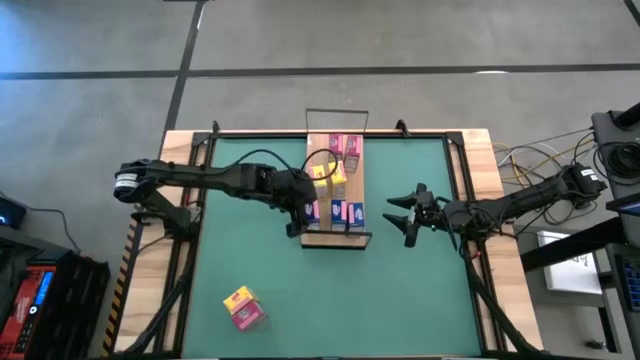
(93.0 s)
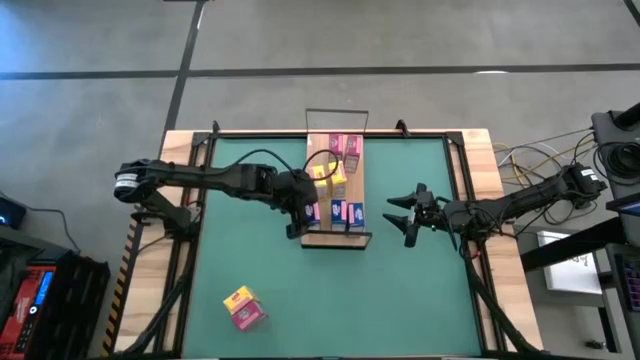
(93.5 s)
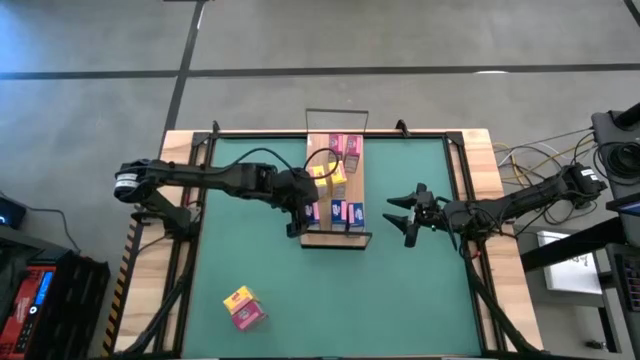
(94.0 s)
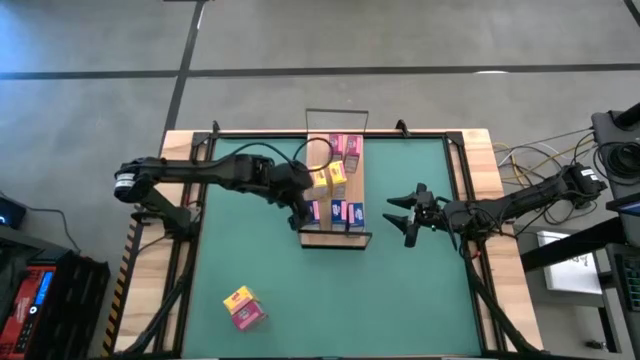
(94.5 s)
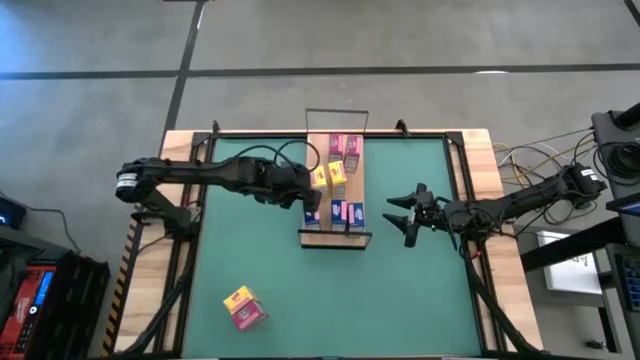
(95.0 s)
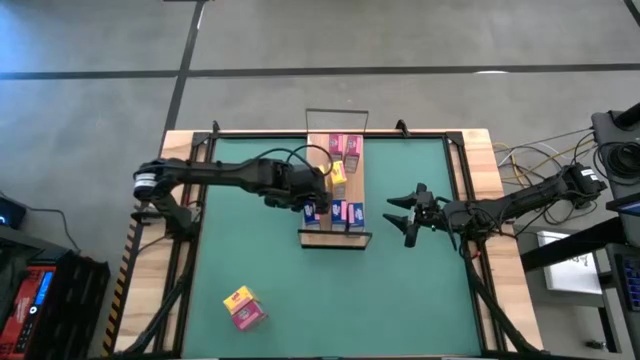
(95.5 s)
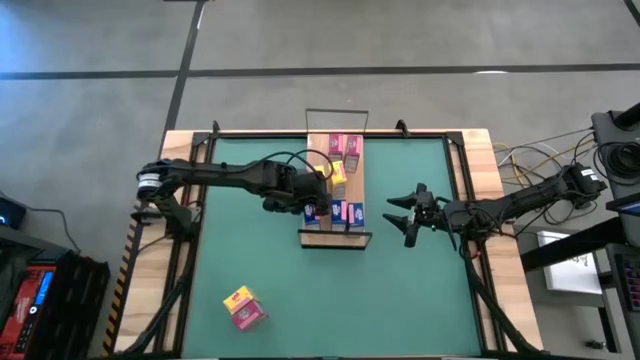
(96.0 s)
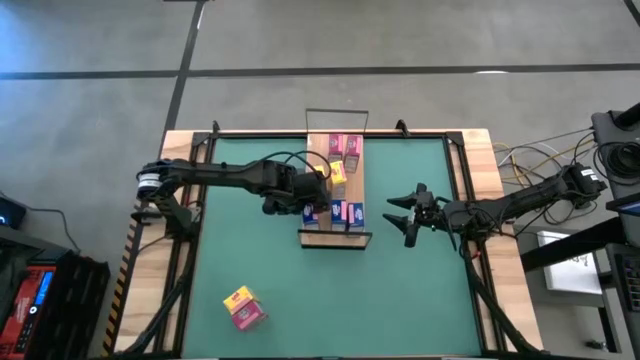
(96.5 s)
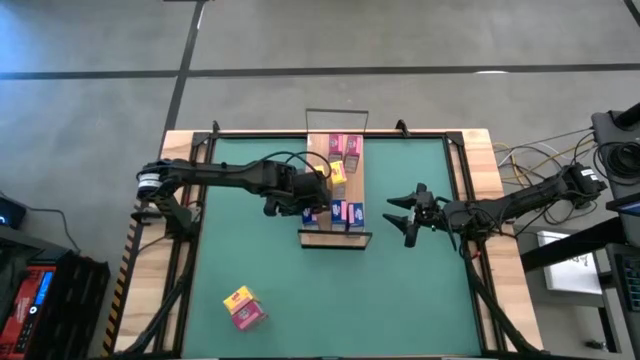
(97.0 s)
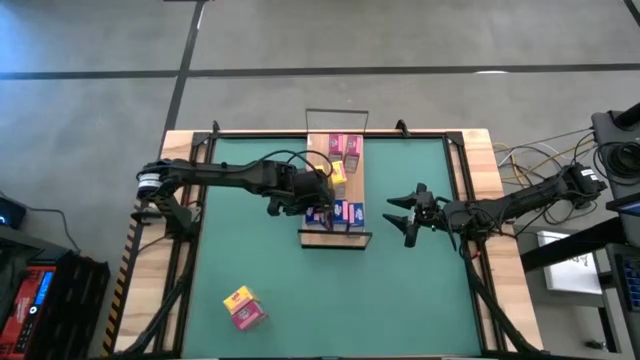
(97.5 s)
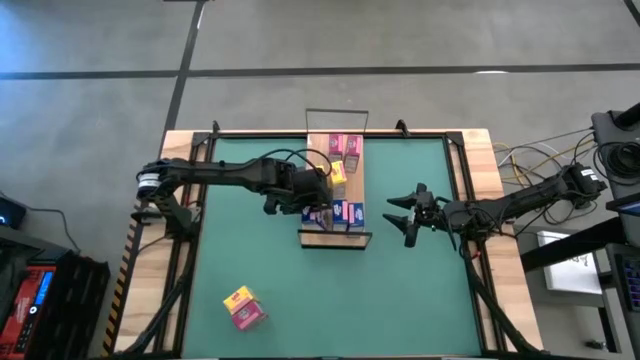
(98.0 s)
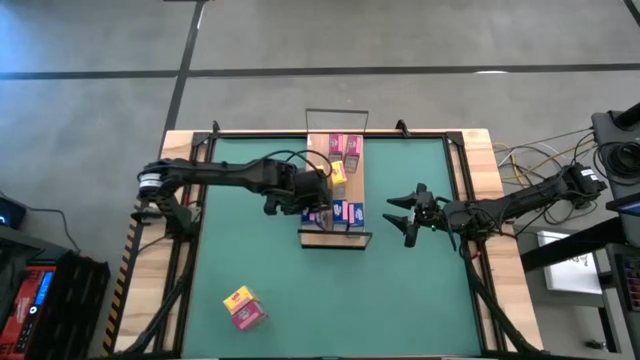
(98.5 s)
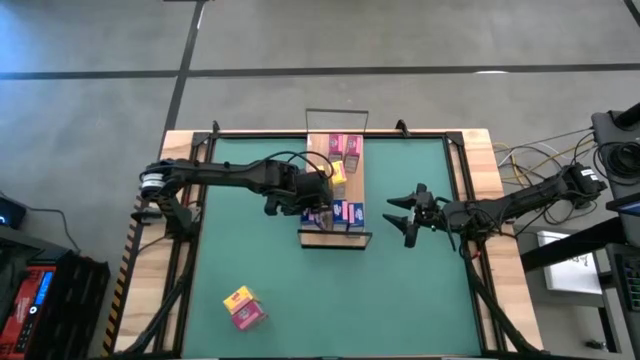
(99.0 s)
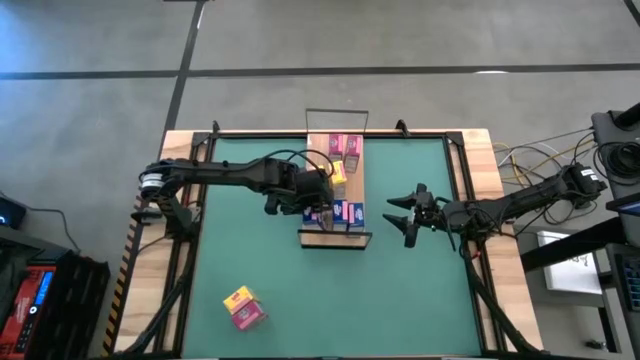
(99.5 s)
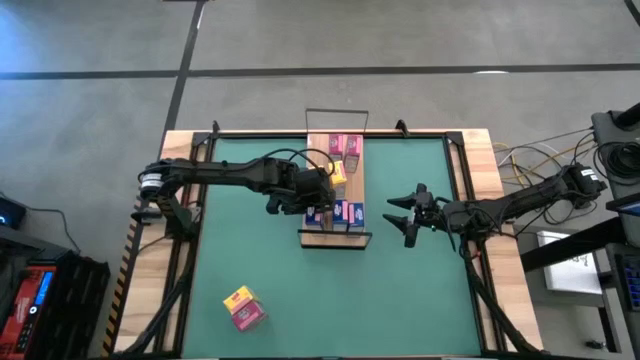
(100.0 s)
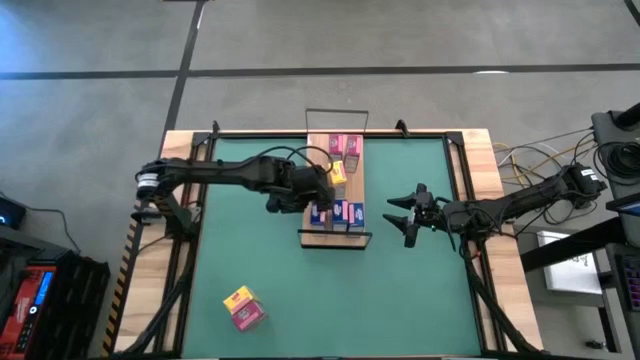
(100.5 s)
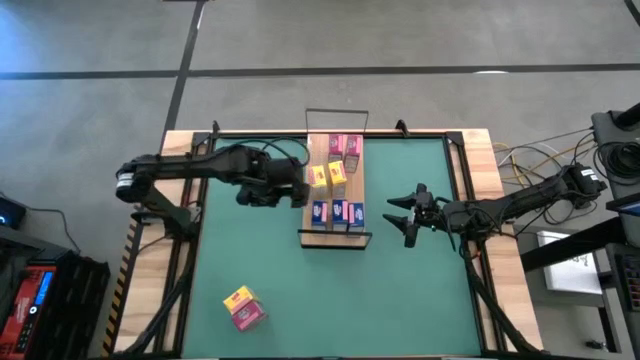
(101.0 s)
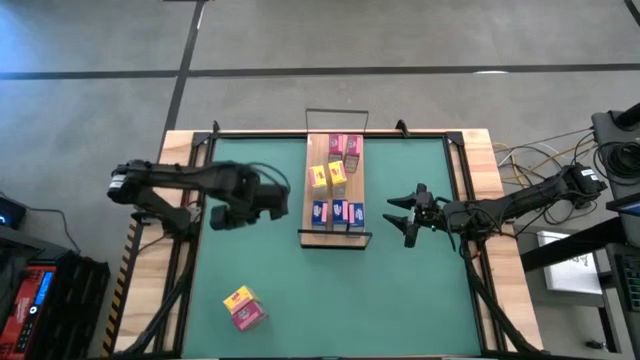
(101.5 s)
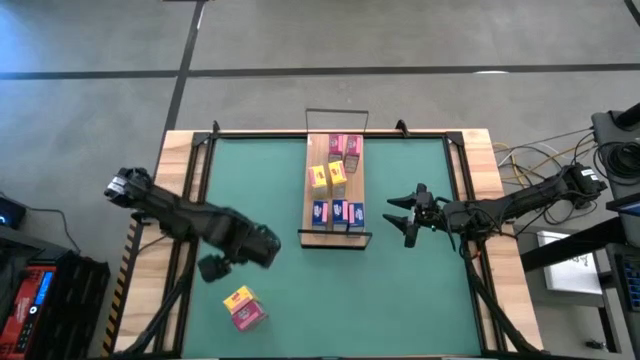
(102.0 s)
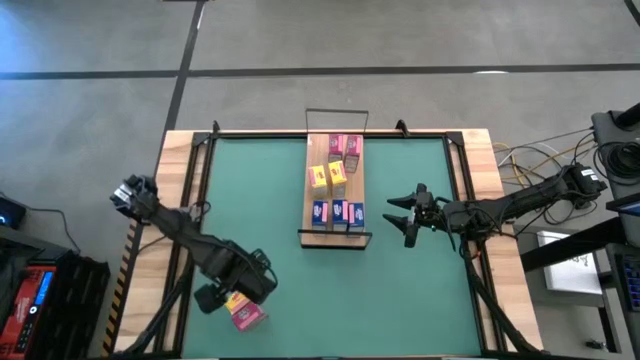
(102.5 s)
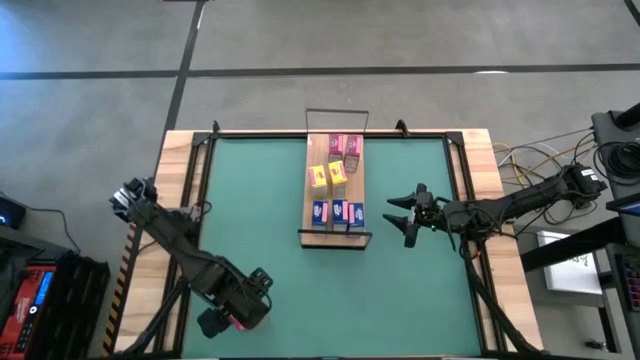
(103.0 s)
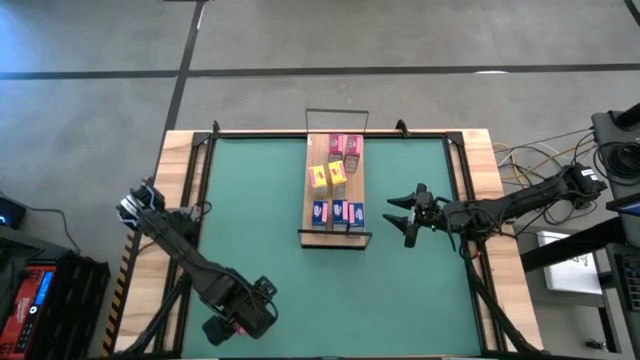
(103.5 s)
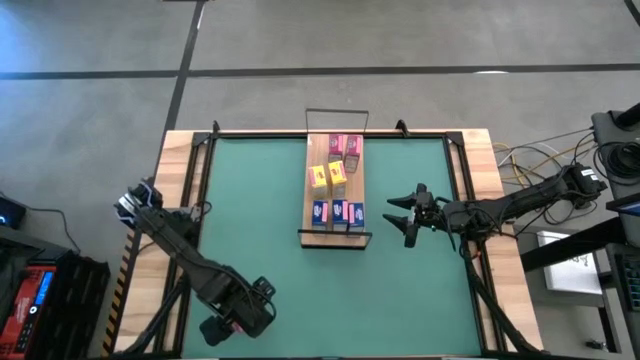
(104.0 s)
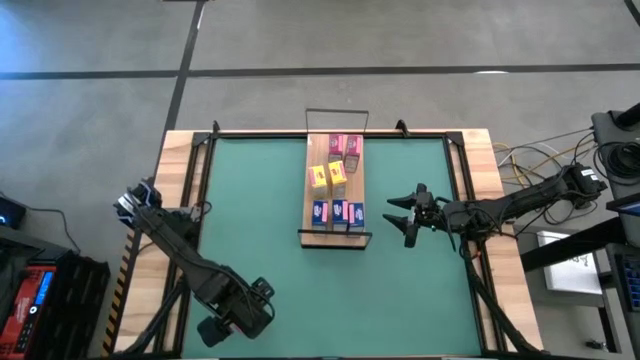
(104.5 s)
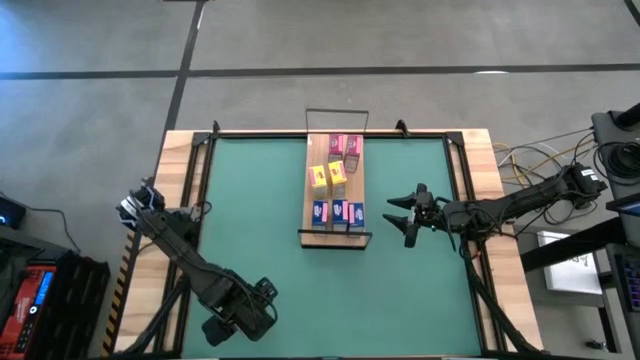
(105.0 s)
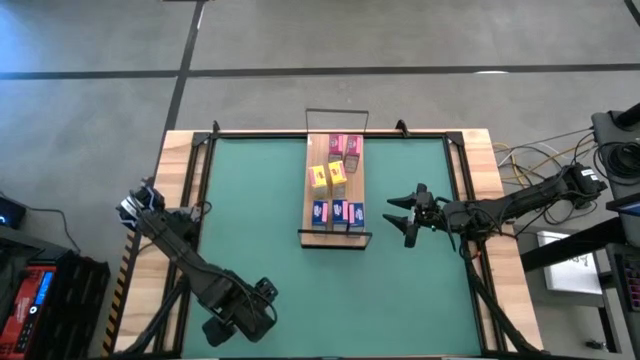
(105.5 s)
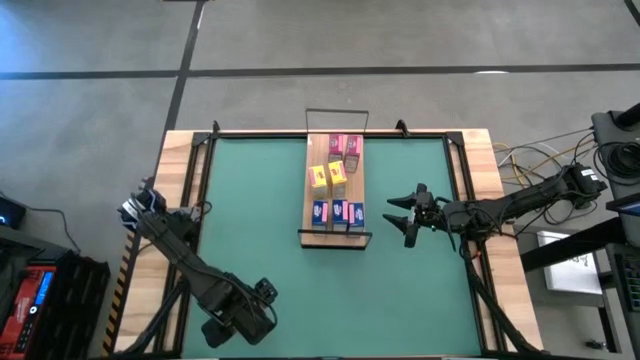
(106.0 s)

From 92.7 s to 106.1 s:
Task: Stack cereal on shelf
Put the pink cereal box on the shelf

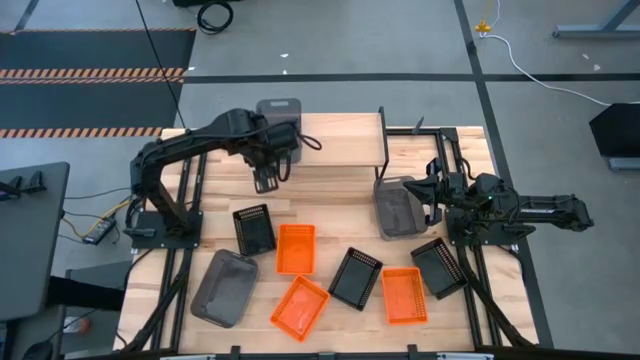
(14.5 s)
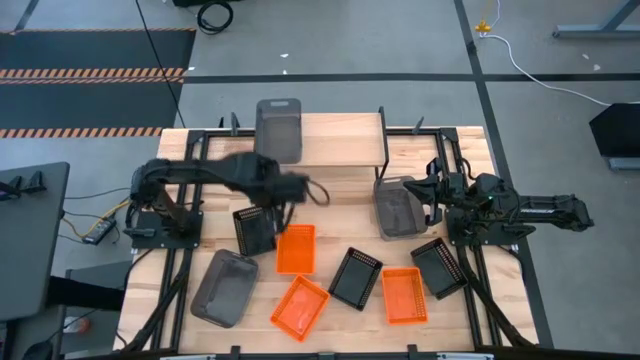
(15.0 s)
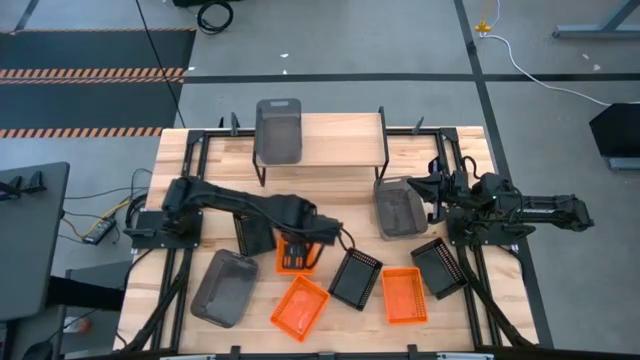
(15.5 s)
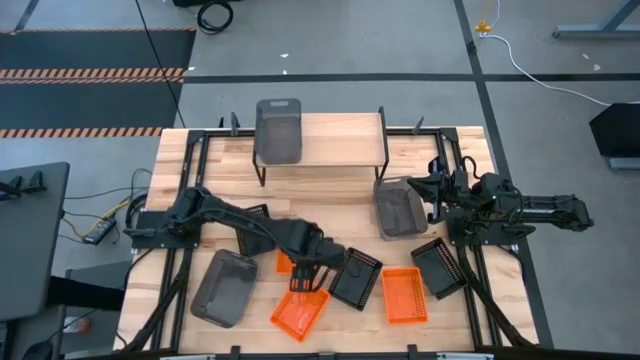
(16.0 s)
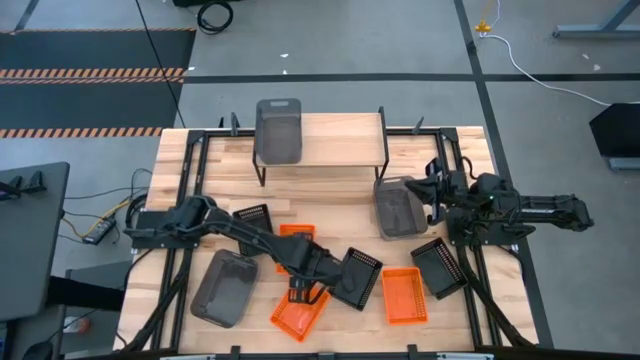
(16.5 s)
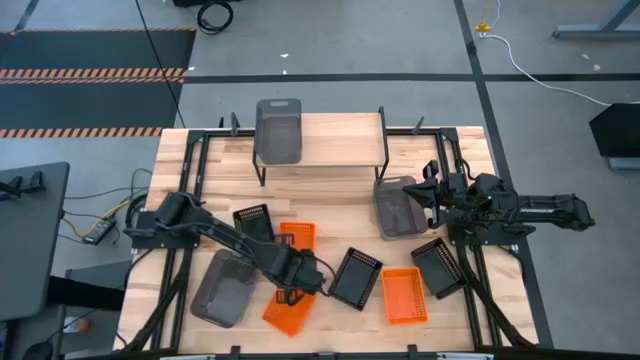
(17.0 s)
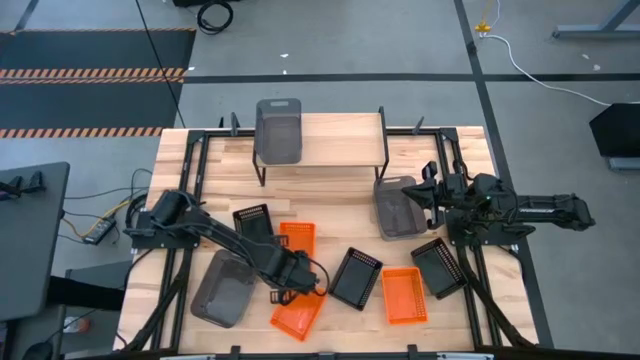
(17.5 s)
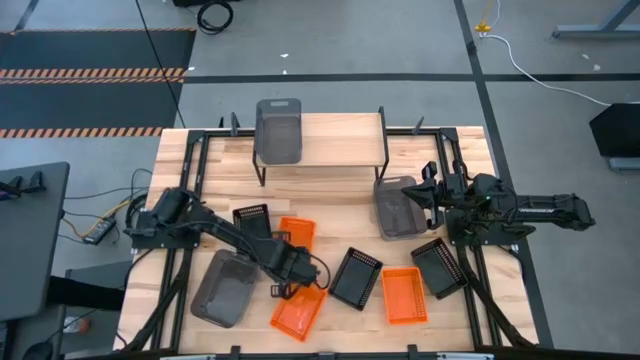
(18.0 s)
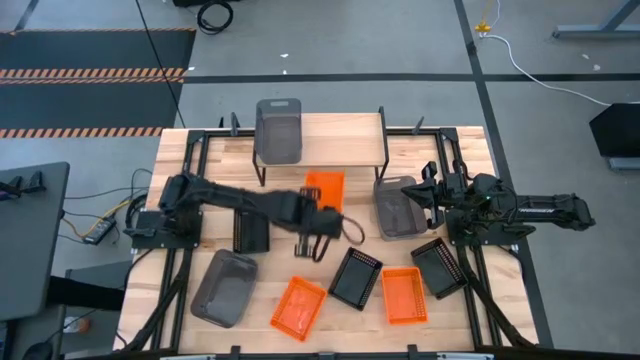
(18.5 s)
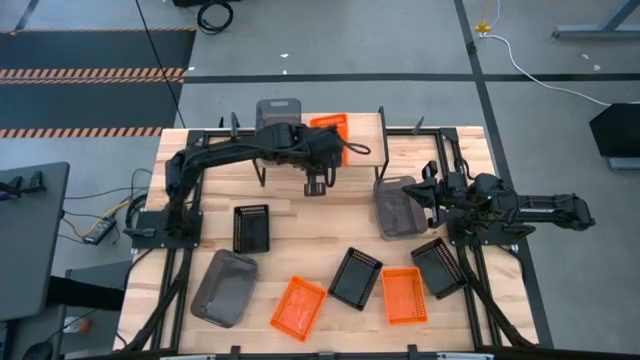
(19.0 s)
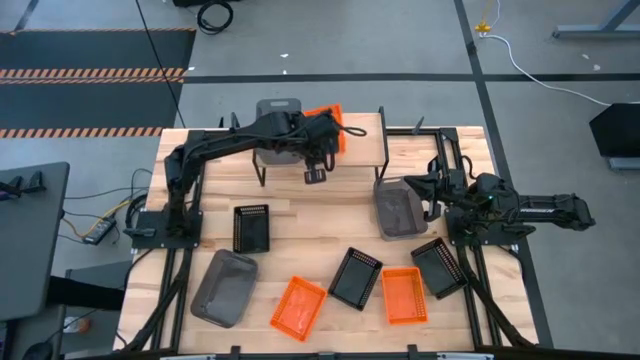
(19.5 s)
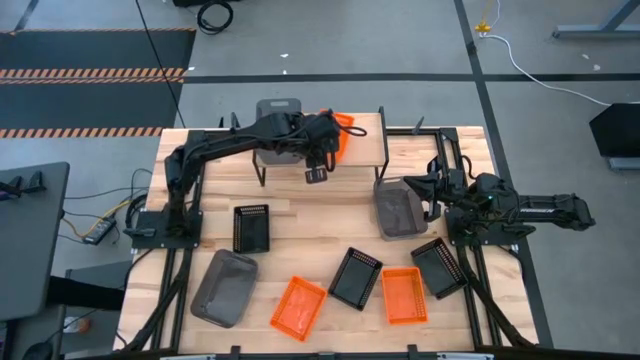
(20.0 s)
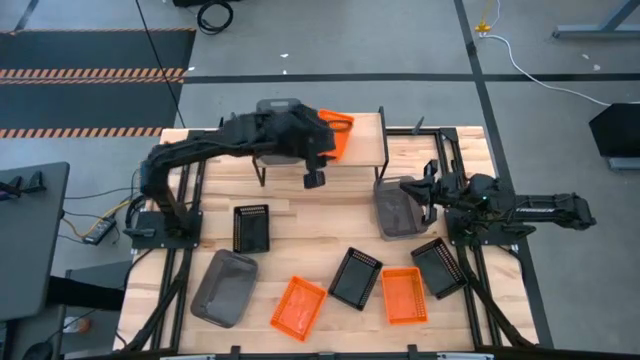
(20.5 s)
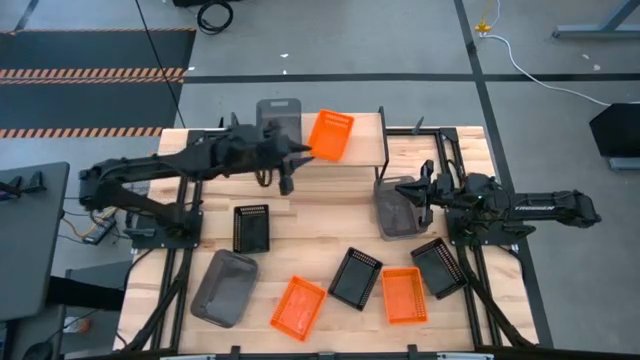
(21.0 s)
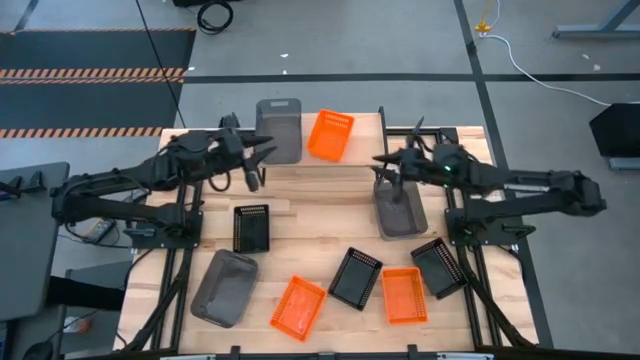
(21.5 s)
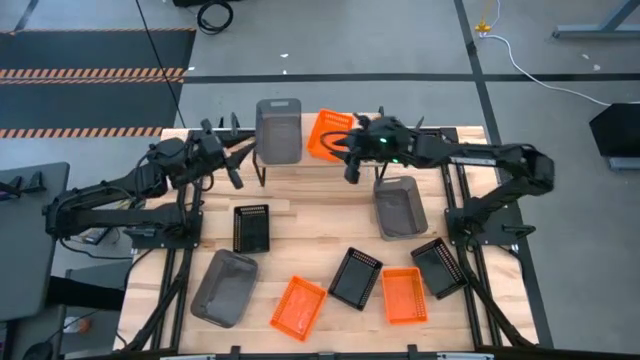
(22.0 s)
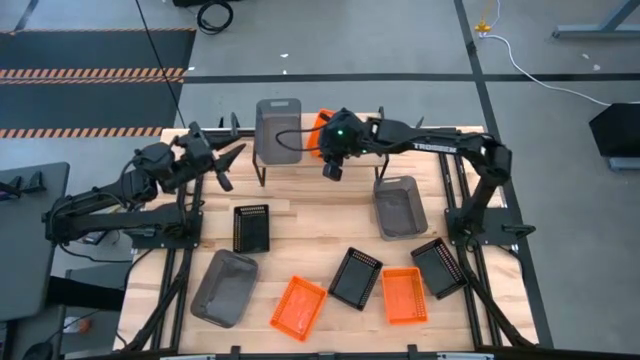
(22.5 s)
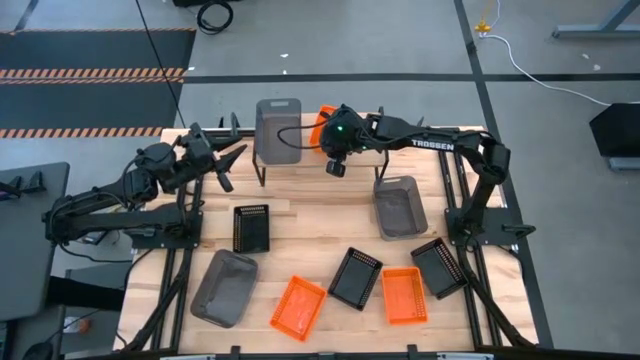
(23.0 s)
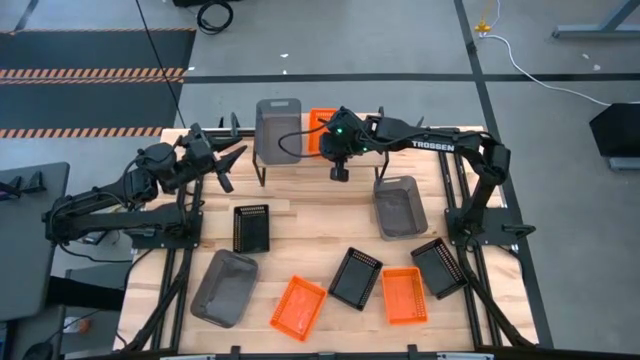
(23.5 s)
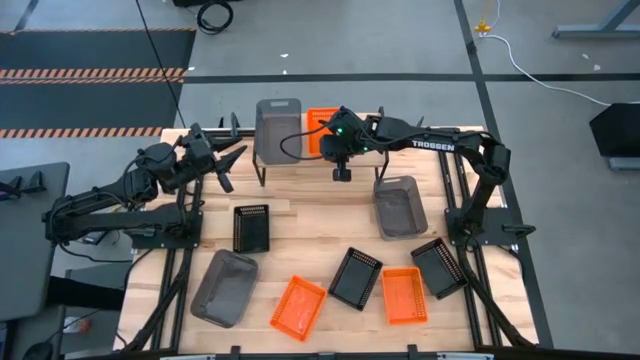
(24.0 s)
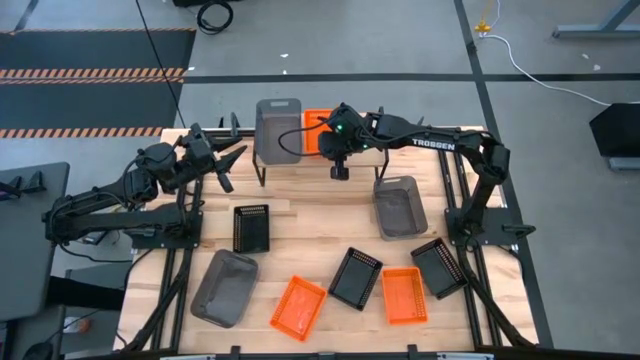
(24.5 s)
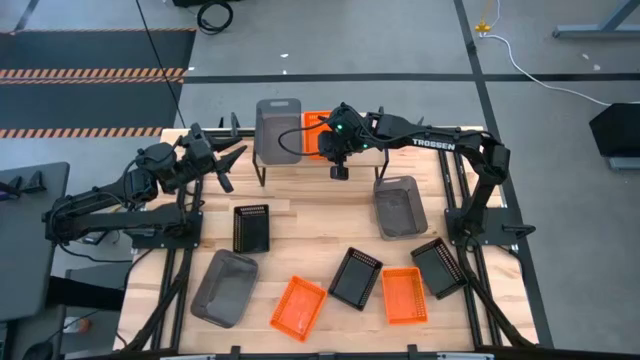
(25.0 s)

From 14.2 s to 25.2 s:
Task: Stack baskets on shelf by color
Put the top orange basket on the shelf
